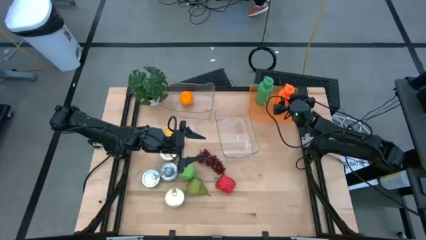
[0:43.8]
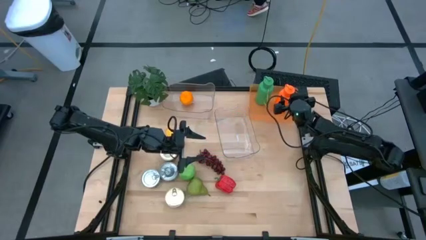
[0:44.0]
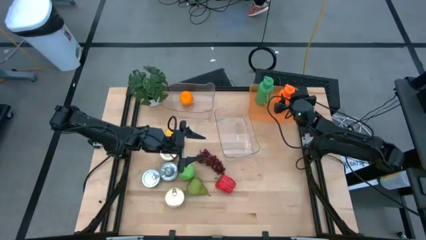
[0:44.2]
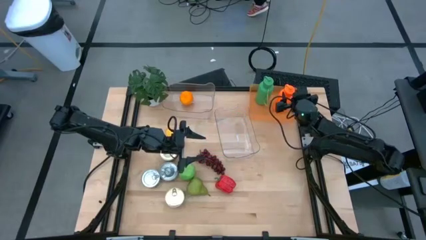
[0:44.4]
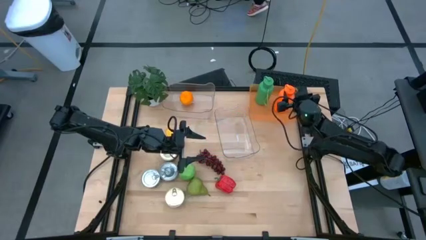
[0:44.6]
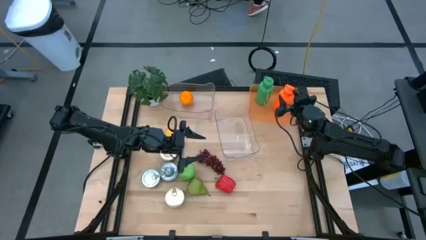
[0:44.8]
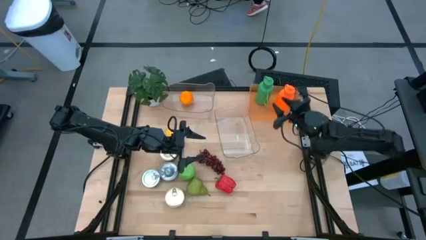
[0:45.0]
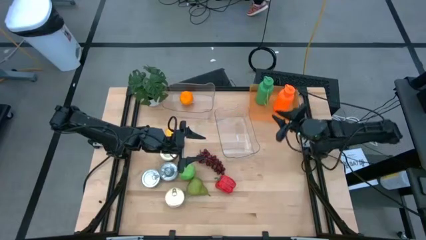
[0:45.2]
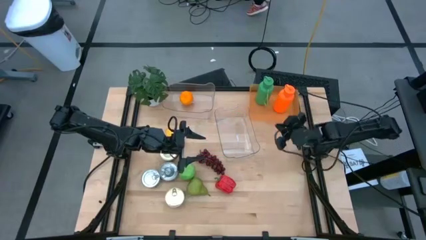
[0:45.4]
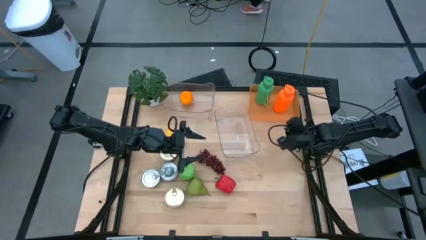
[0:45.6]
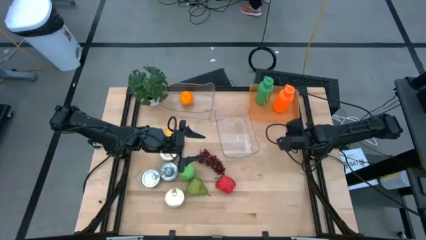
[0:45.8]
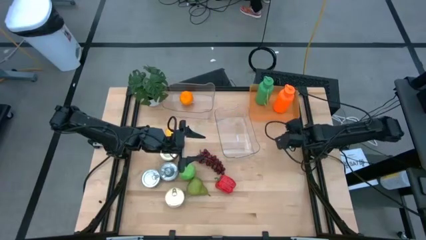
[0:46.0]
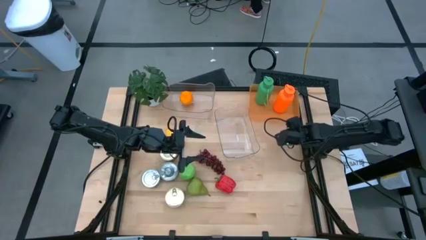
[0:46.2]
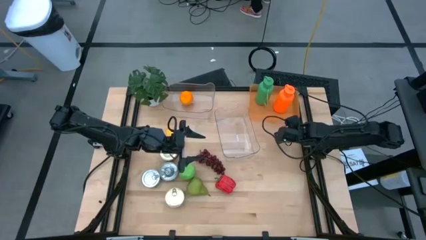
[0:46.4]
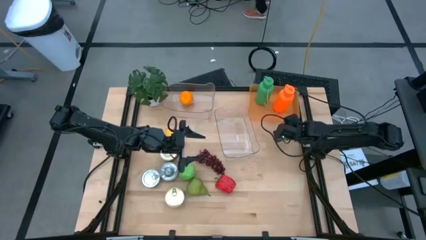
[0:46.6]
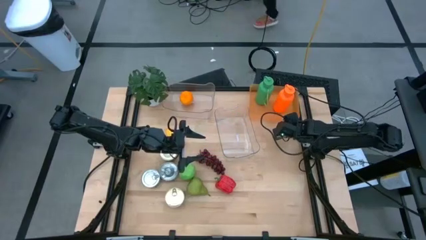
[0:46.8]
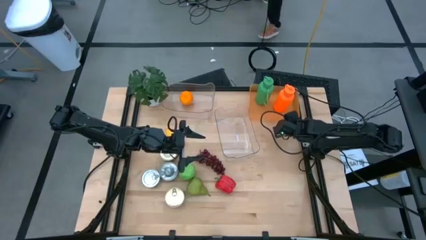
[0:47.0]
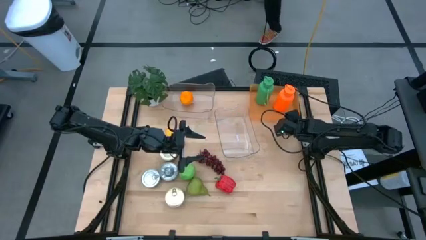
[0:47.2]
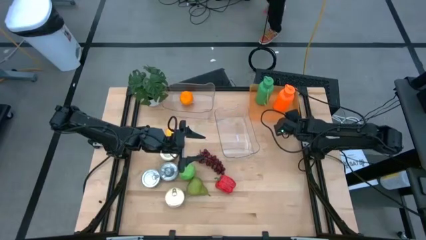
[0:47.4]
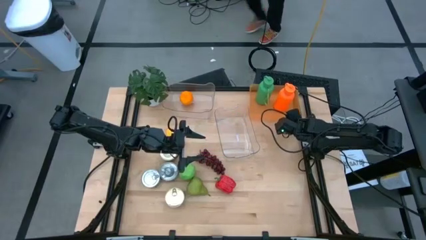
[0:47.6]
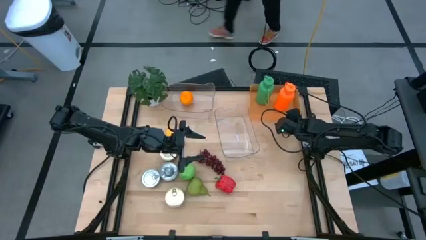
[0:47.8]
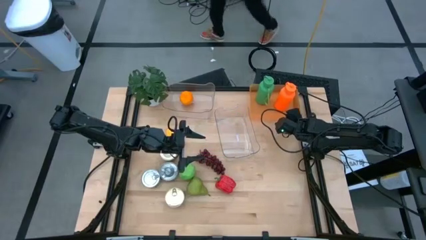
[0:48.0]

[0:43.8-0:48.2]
Task: Pick & Place Food Item
Adjust the orange bin on the table

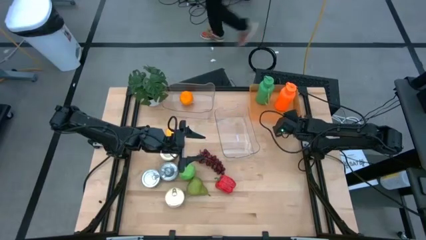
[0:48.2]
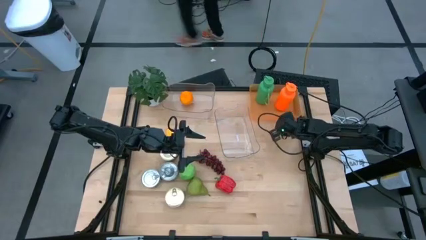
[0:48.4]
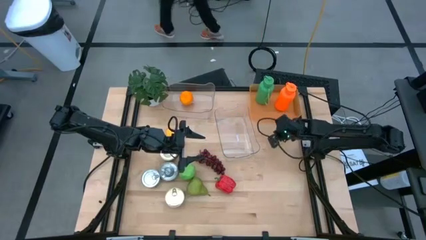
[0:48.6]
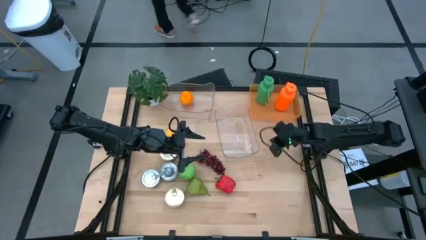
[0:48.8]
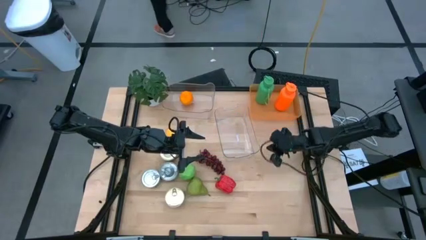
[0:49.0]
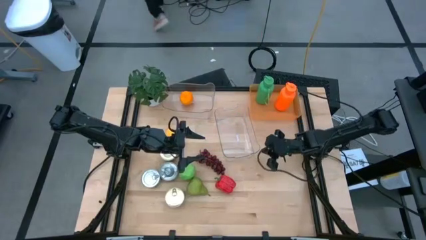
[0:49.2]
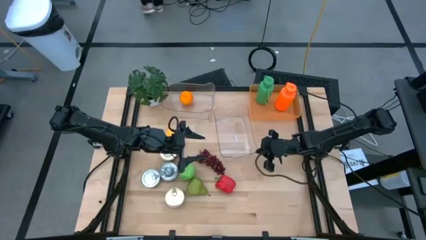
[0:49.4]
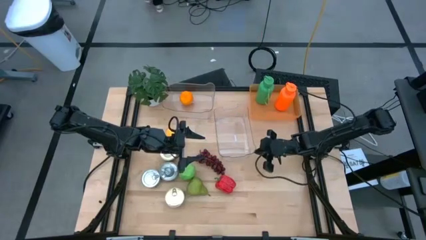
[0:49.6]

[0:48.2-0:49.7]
Adjust the bottom transparent bin on the table

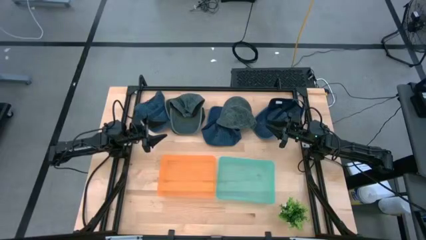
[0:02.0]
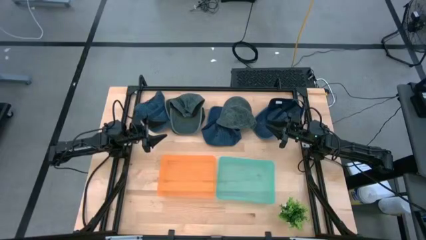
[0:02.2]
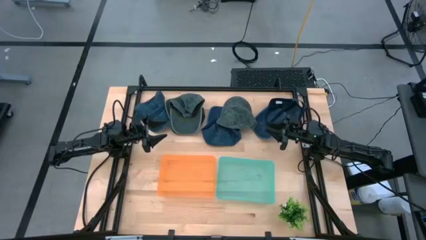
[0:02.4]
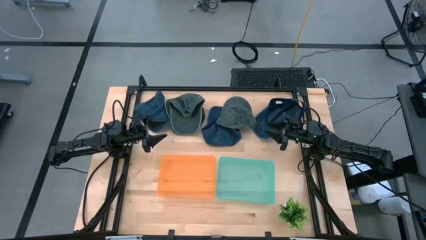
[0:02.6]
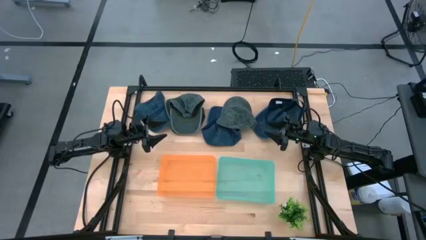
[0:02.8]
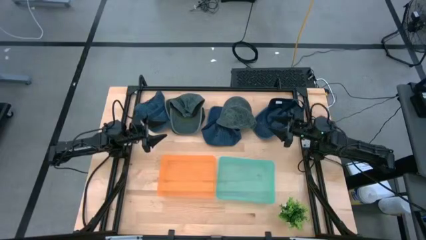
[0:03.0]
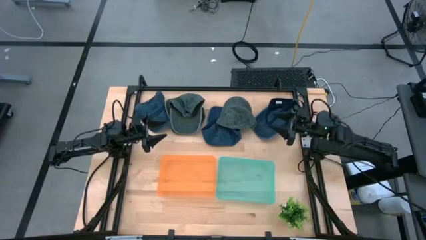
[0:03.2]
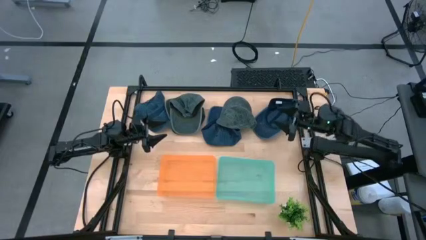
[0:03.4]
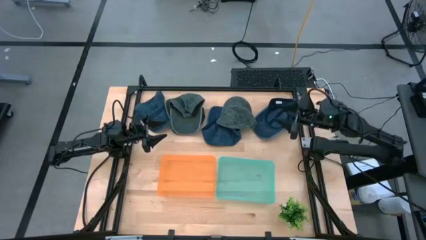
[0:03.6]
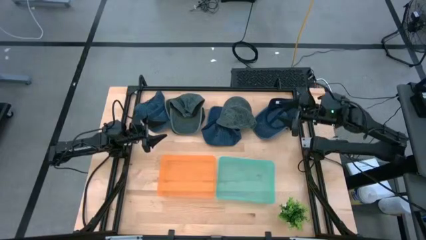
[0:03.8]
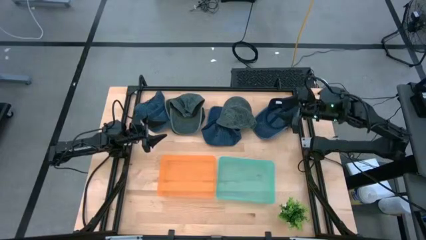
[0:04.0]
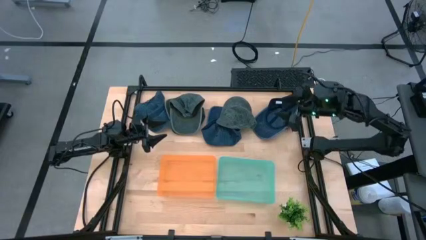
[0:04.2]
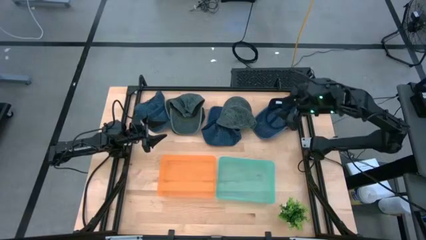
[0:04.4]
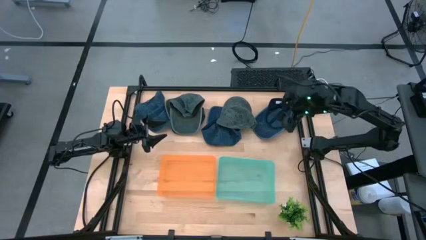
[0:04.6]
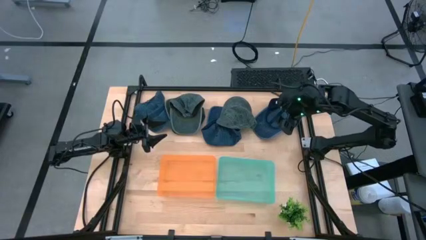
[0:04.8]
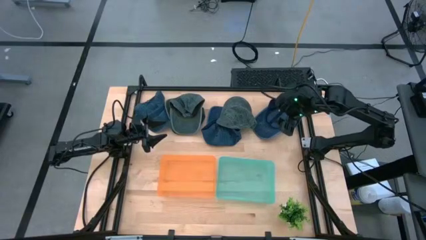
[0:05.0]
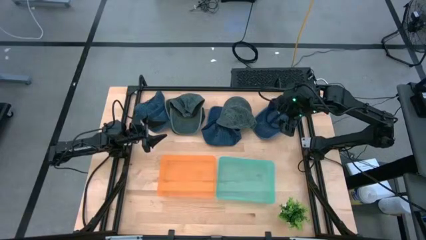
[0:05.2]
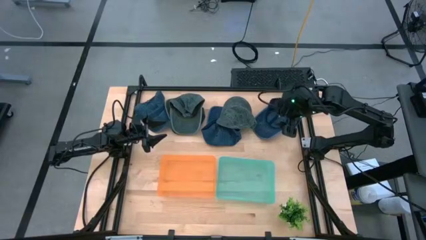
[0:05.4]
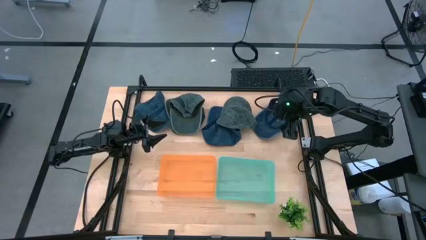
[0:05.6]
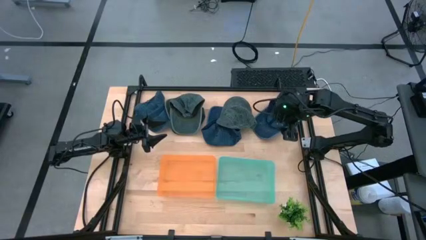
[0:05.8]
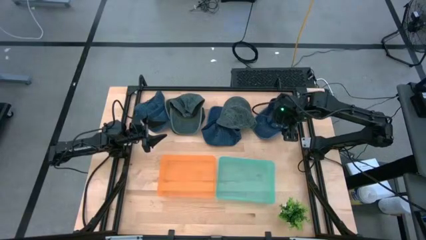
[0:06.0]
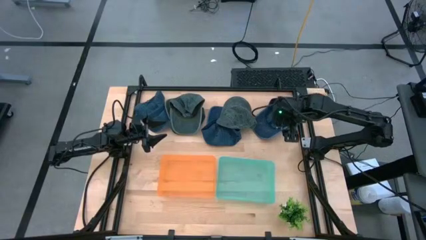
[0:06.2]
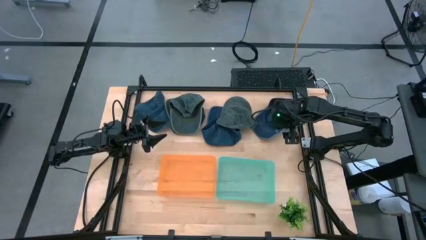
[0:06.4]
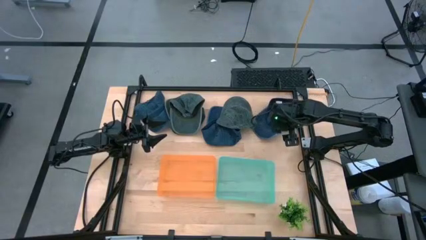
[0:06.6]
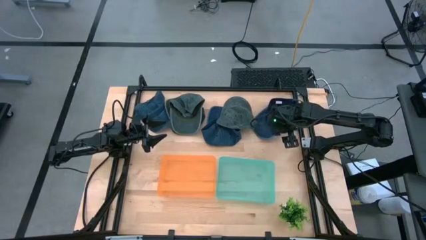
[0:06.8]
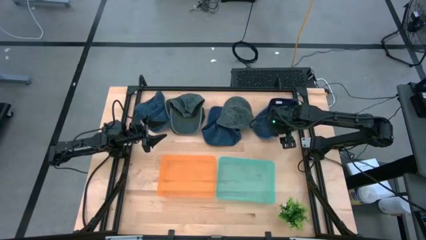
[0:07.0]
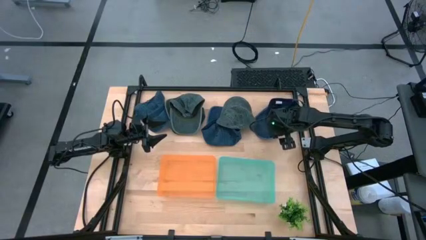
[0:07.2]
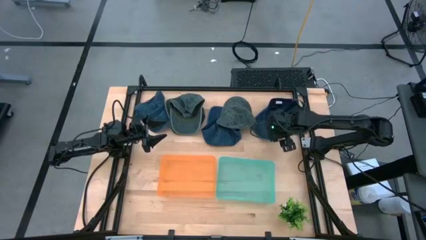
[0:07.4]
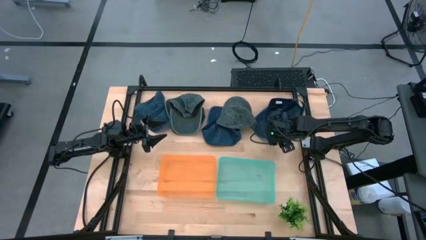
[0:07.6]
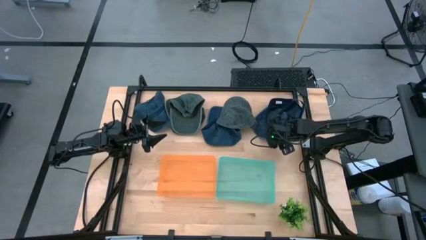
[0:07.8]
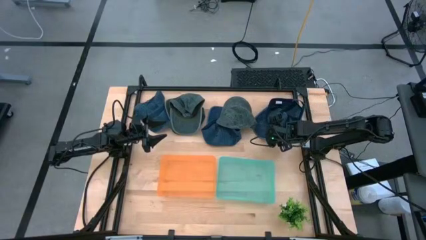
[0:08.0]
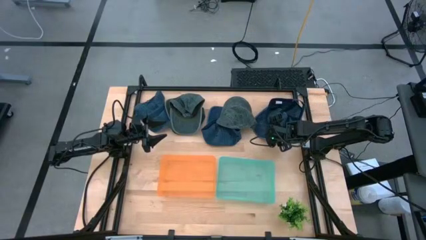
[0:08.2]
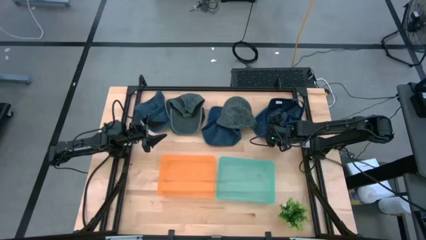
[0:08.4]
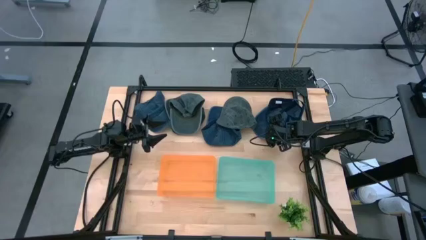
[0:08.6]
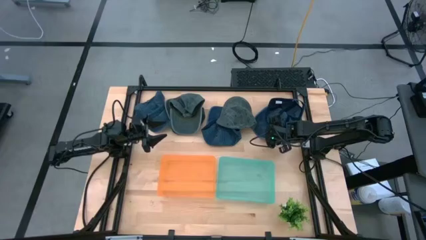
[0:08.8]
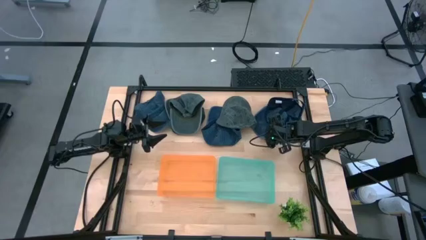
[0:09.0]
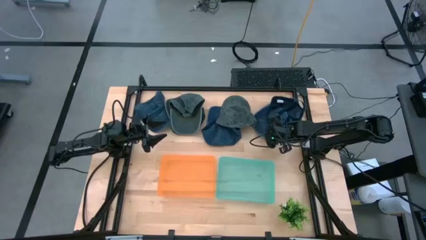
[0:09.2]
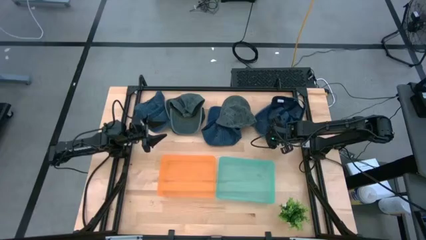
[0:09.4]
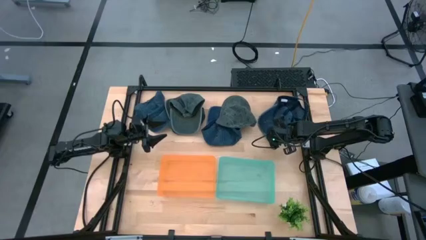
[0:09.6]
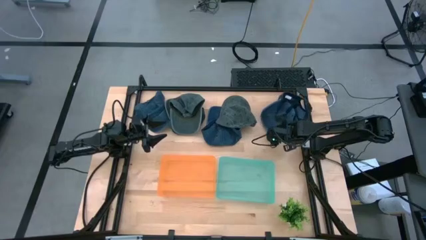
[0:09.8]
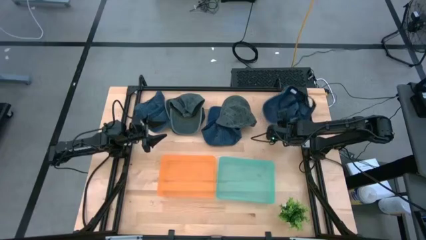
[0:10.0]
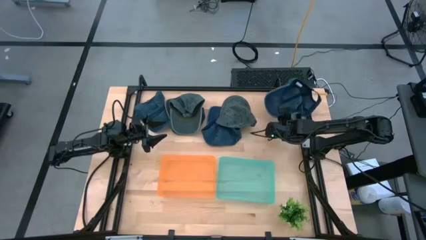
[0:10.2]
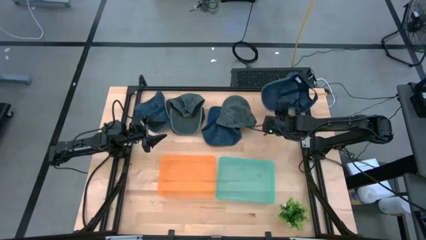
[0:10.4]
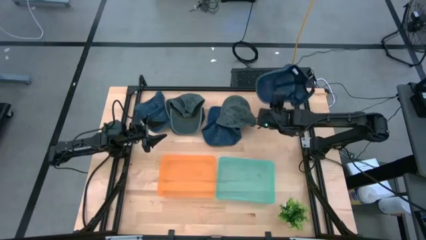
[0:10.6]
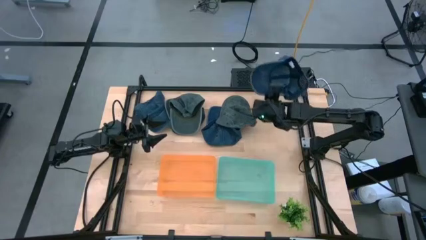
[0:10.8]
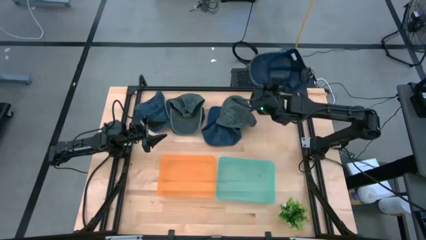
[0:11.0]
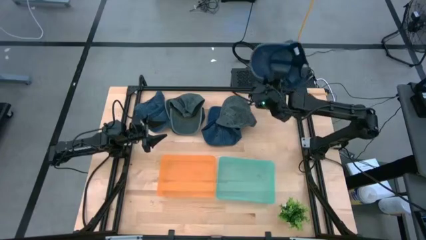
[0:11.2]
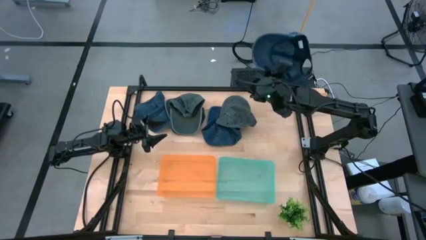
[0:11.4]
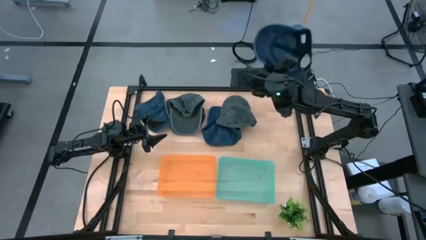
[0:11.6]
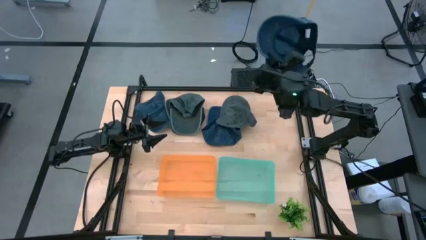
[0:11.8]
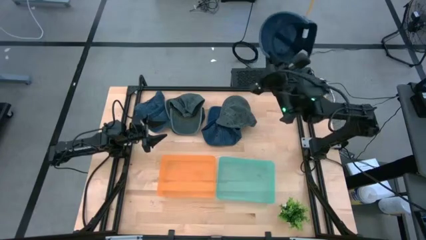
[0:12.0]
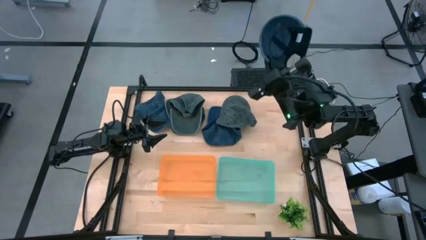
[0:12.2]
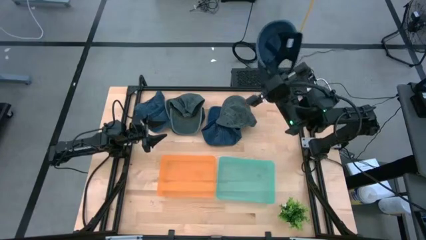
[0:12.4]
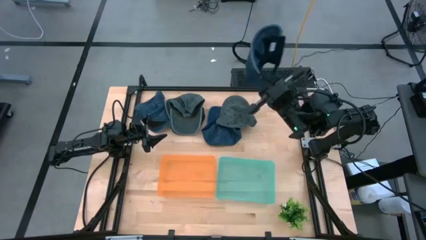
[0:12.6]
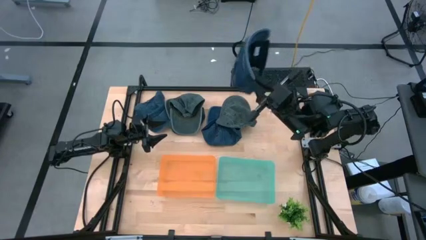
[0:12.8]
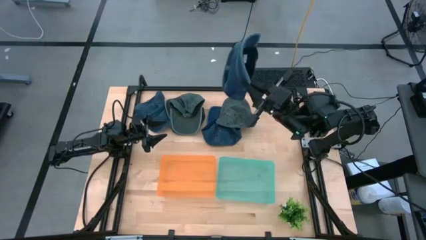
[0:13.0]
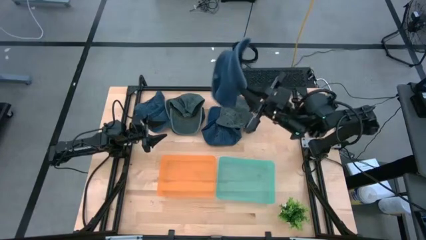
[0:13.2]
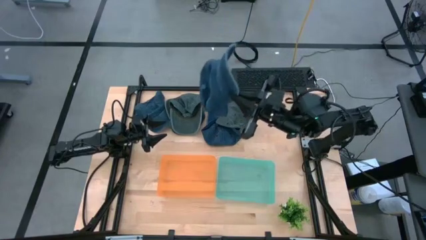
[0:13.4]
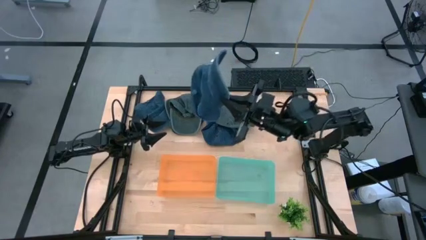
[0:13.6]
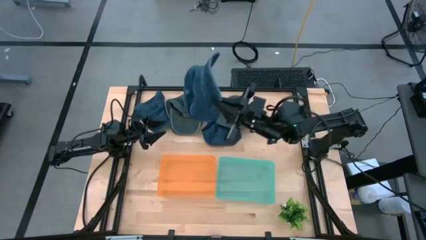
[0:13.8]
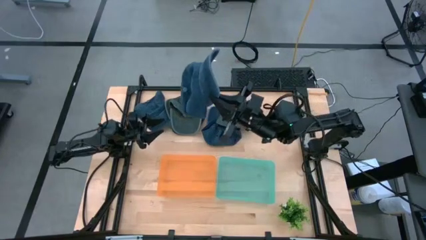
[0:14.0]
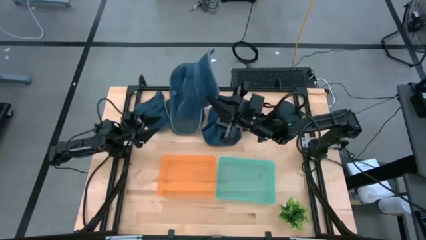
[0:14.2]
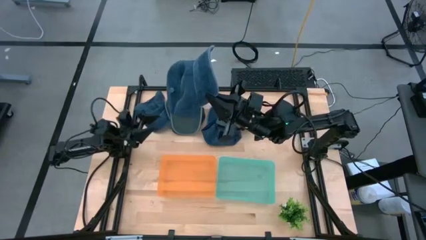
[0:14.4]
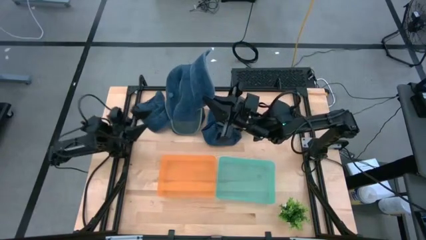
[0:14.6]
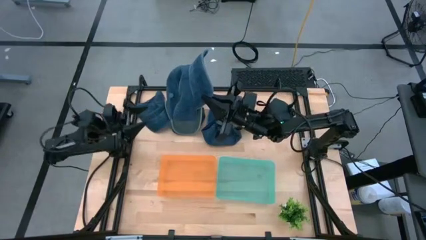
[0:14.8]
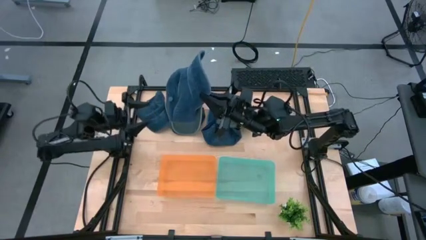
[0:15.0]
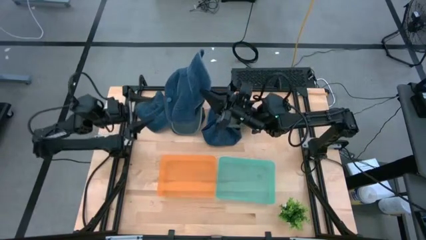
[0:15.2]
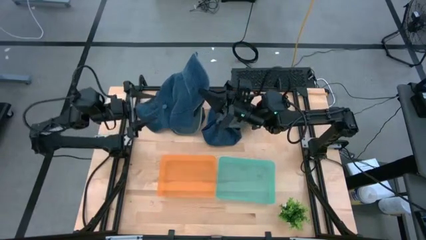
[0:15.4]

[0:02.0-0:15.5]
Task: Pick & Place hat
Put the right blue cap into the orange bin
